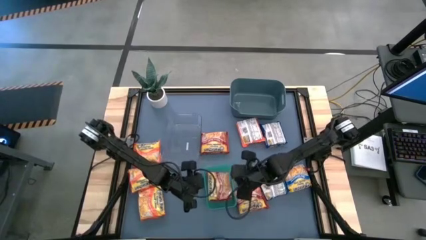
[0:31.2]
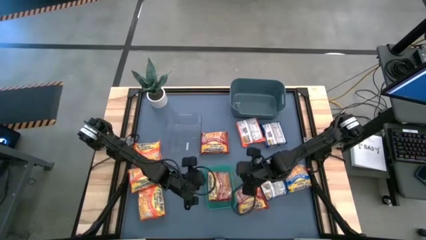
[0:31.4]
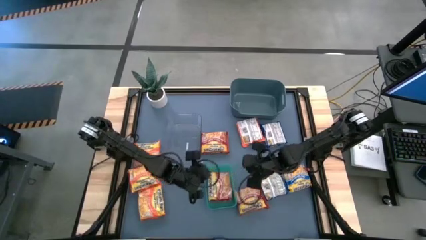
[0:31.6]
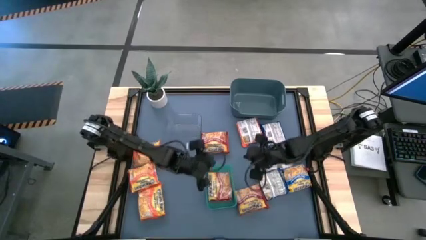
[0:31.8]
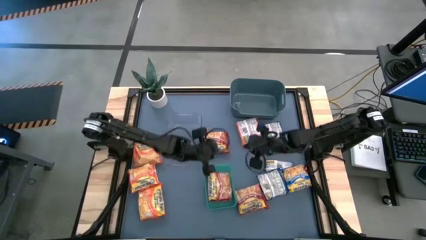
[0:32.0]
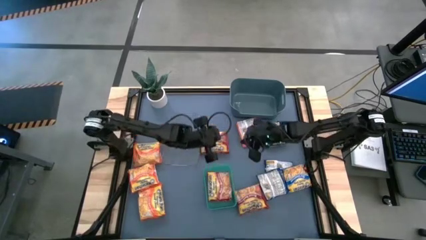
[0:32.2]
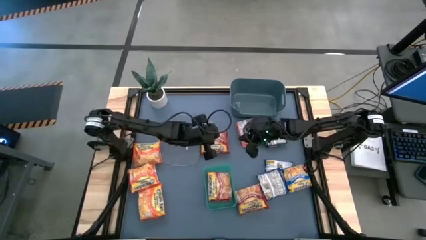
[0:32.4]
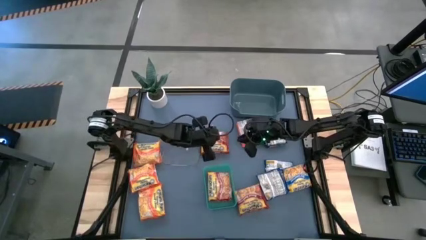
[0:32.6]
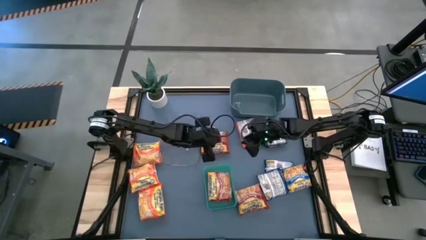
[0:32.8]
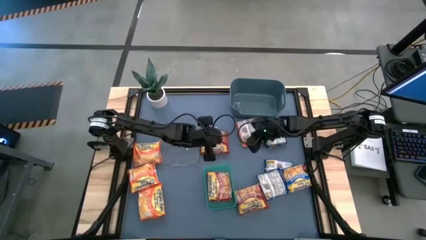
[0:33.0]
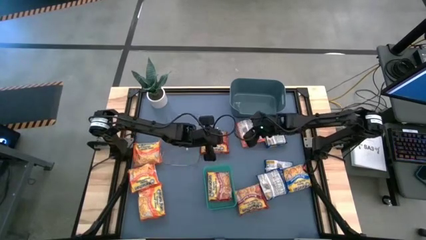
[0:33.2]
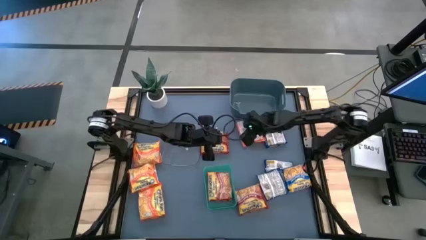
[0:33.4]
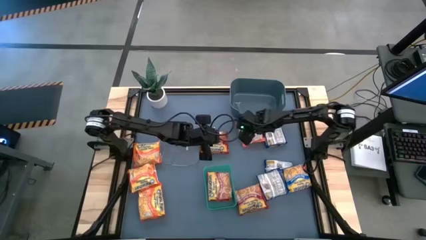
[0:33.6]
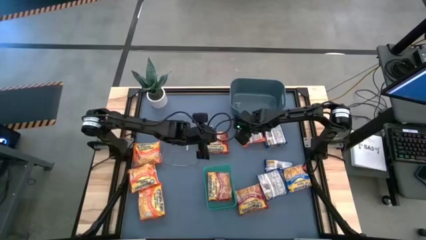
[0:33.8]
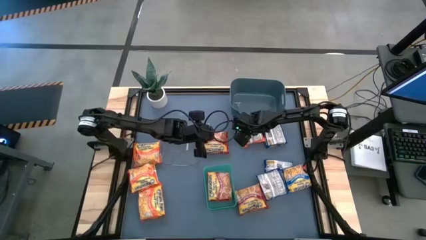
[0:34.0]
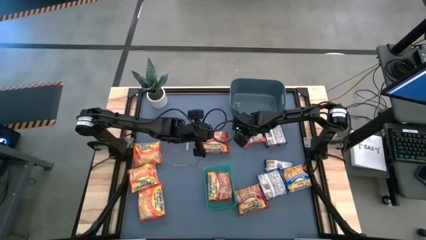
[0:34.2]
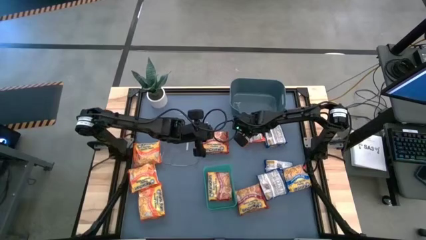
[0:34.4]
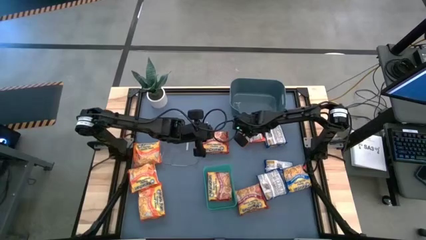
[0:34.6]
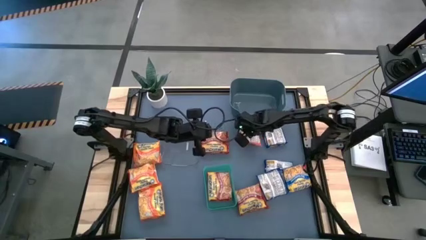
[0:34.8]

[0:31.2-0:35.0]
Task: Sort Maruchan noodles
Put the orange noodle pack into the dark blue bin

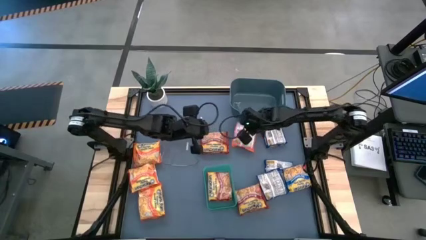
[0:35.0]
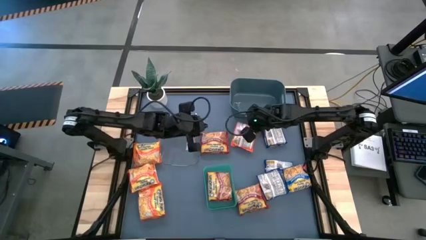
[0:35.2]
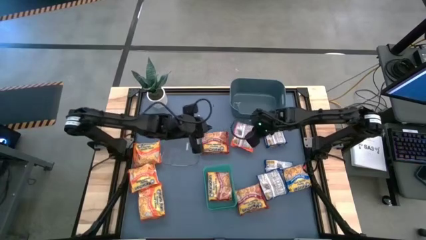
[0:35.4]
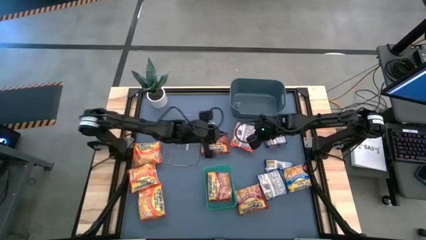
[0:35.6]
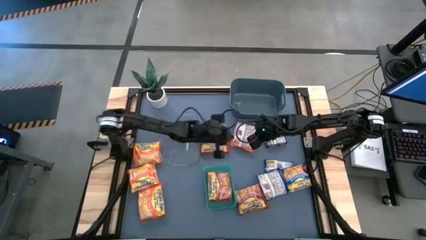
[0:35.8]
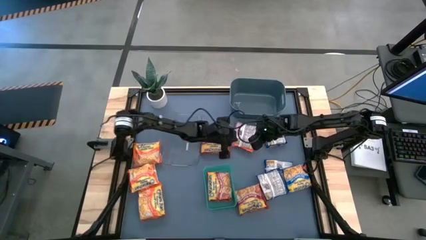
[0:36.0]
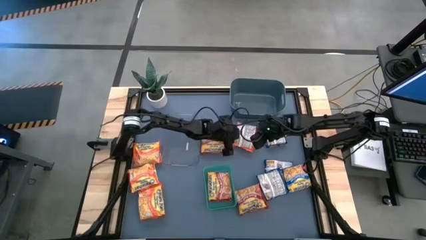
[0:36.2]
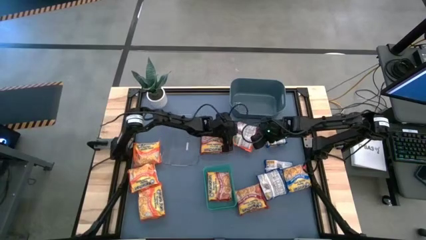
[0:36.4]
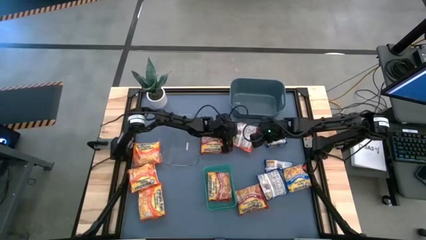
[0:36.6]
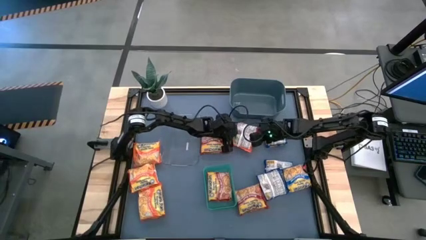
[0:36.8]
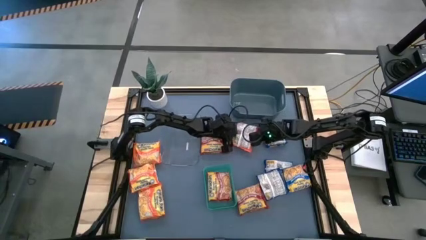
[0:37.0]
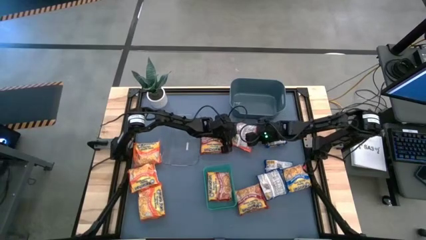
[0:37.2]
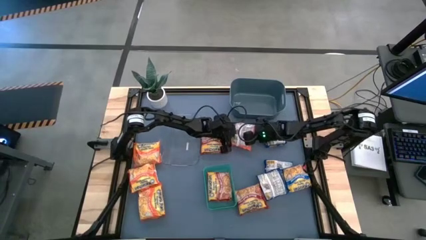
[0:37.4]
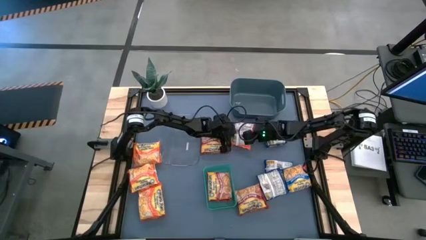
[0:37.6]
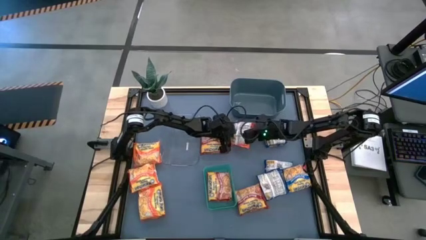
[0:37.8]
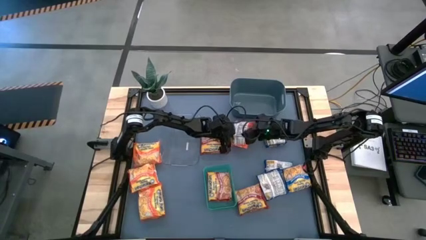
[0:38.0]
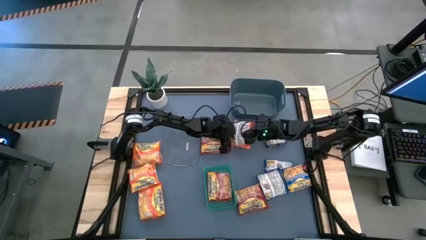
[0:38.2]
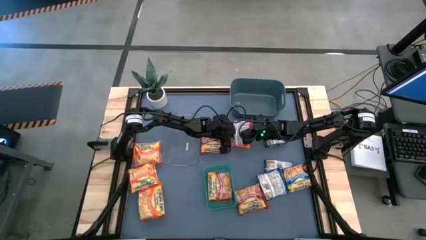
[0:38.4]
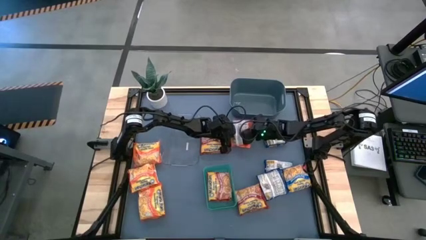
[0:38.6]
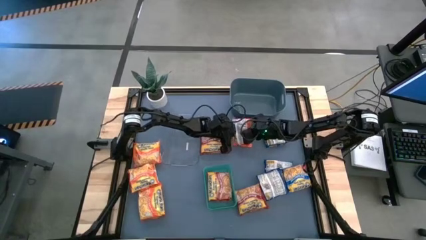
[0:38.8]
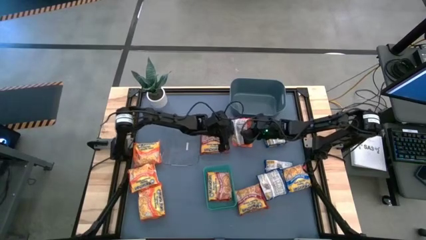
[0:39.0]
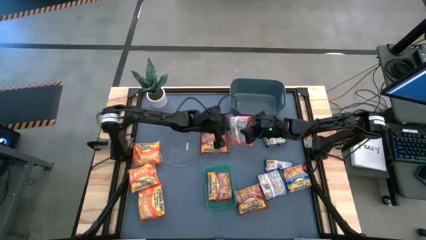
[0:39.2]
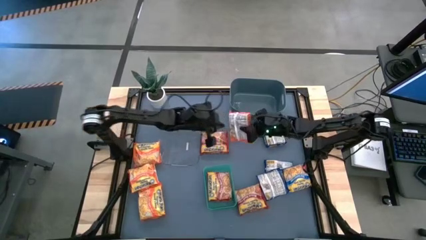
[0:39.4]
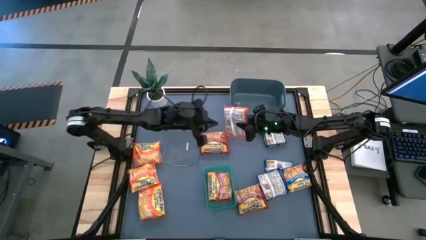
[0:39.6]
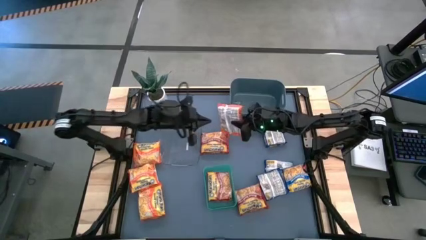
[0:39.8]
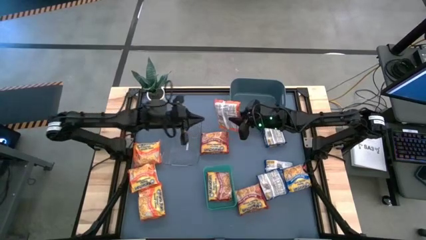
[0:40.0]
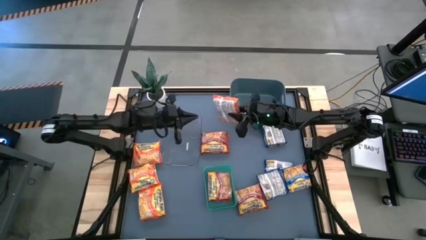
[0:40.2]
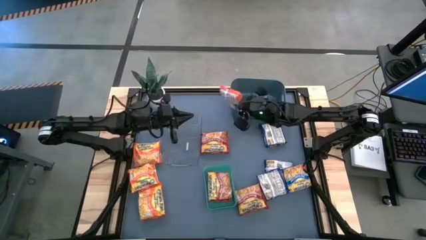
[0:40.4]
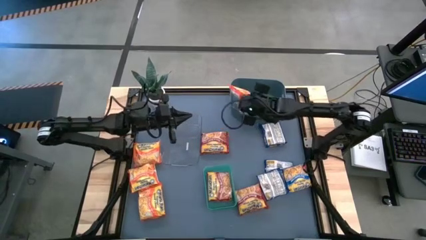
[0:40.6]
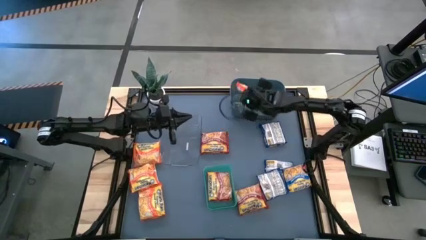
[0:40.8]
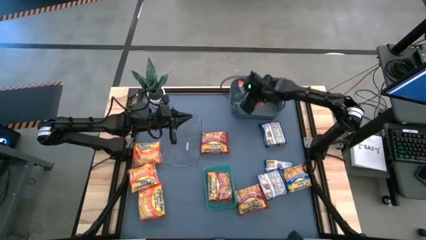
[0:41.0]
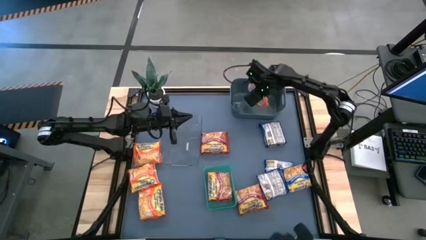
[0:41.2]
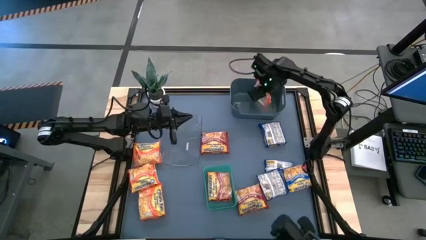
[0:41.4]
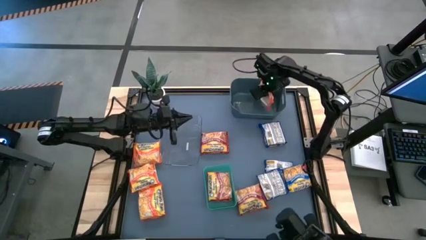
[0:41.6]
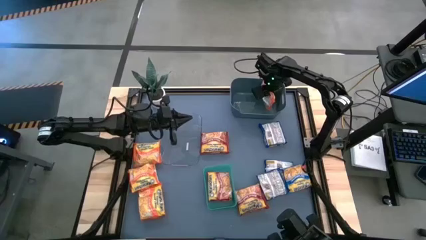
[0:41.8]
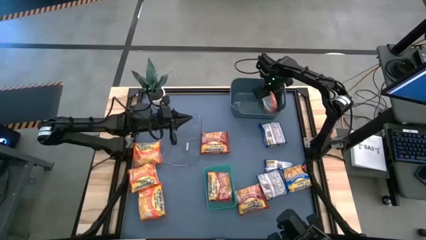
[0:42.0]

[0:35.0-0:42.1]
Put the orange noodle pack into the dark blue bin
